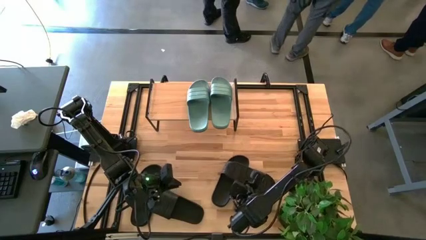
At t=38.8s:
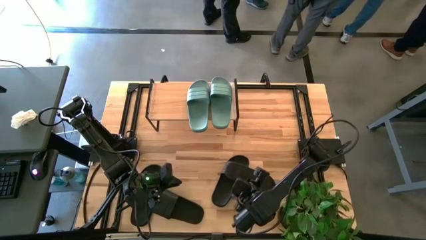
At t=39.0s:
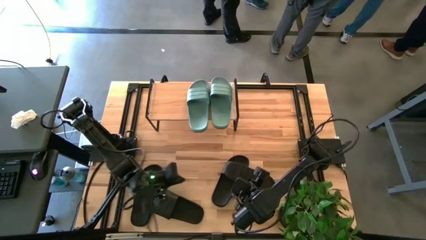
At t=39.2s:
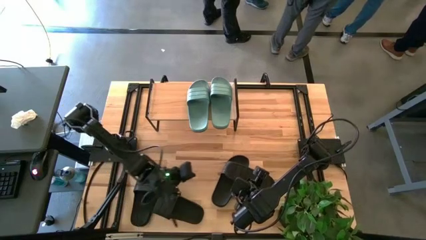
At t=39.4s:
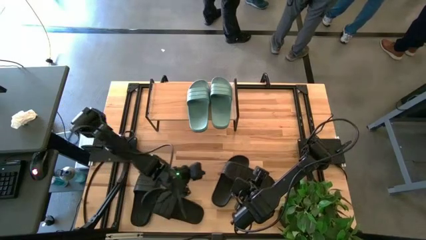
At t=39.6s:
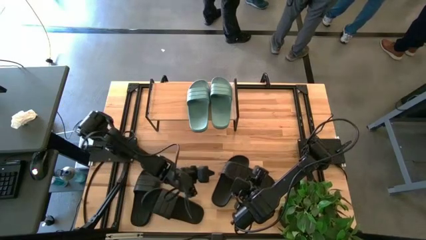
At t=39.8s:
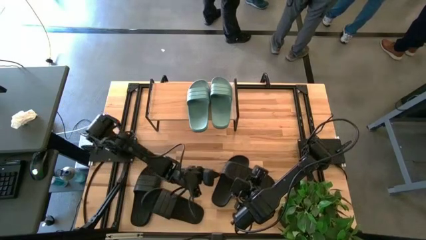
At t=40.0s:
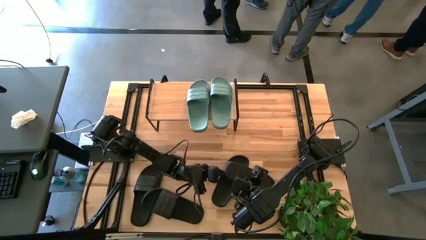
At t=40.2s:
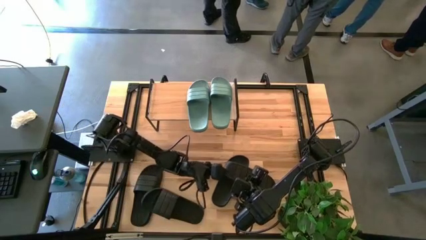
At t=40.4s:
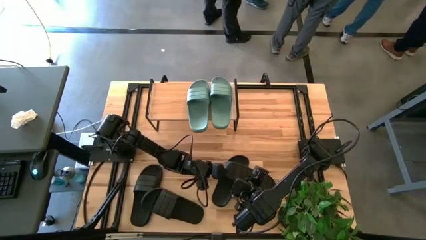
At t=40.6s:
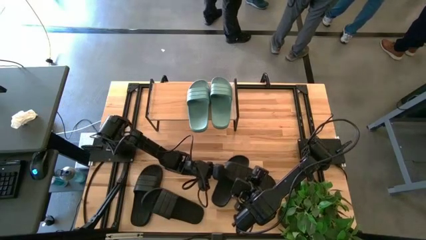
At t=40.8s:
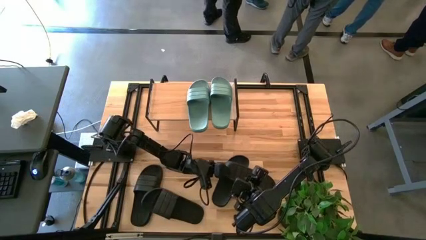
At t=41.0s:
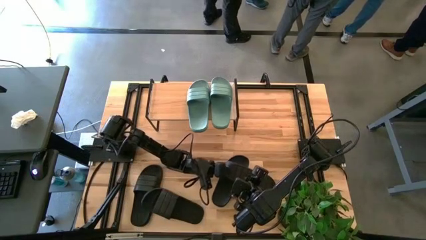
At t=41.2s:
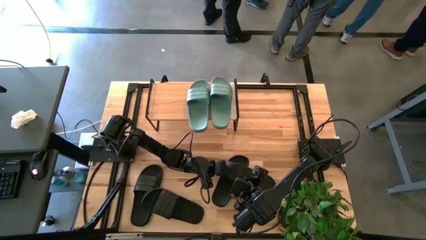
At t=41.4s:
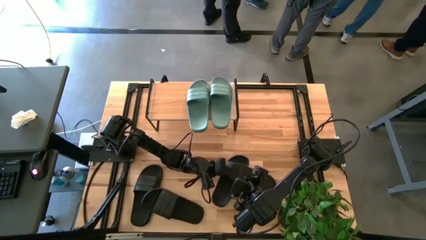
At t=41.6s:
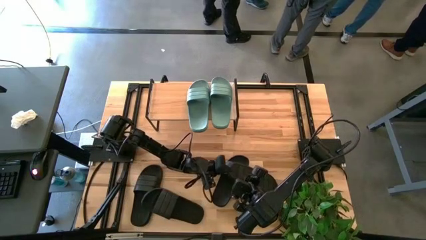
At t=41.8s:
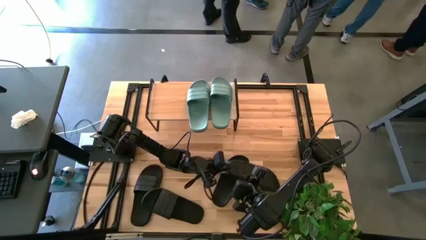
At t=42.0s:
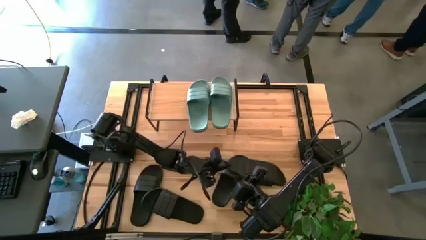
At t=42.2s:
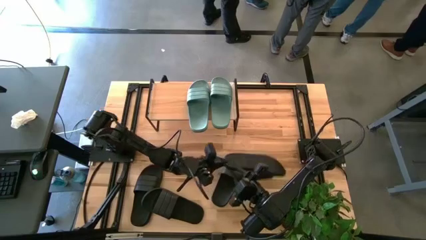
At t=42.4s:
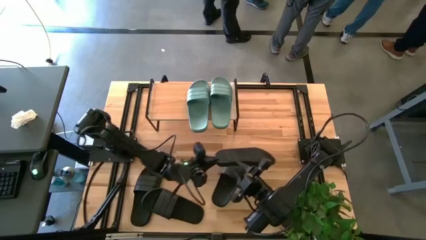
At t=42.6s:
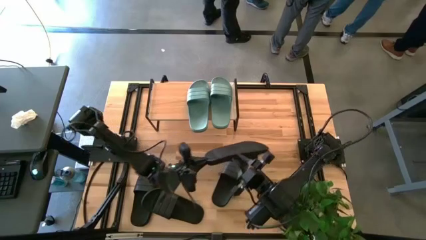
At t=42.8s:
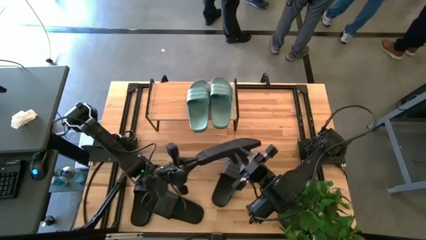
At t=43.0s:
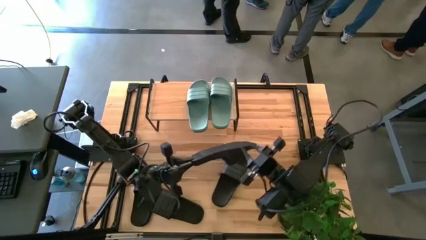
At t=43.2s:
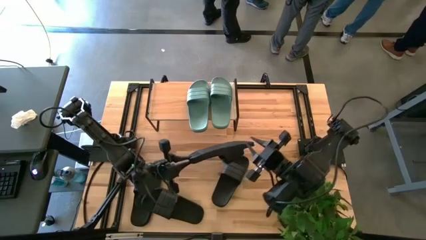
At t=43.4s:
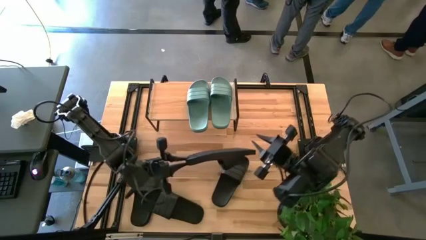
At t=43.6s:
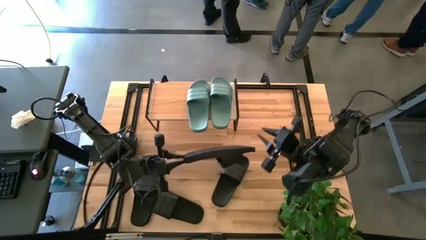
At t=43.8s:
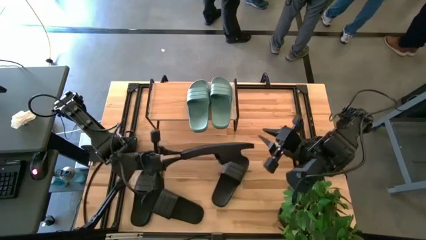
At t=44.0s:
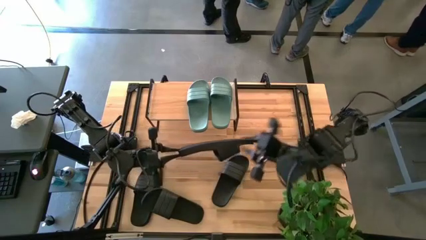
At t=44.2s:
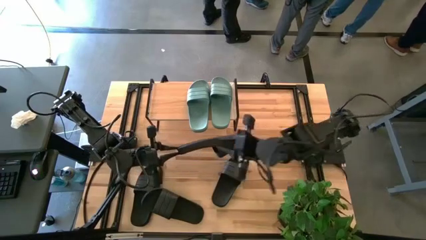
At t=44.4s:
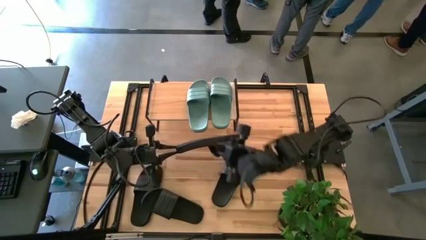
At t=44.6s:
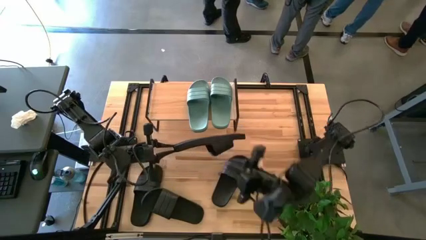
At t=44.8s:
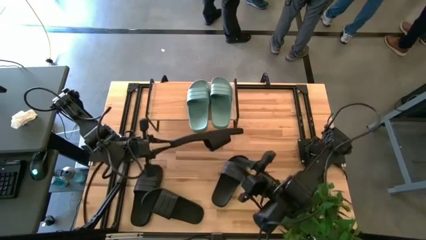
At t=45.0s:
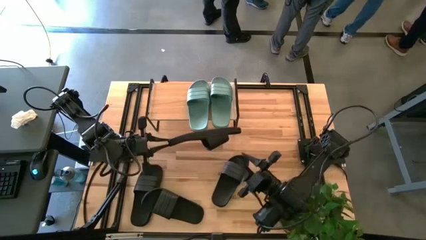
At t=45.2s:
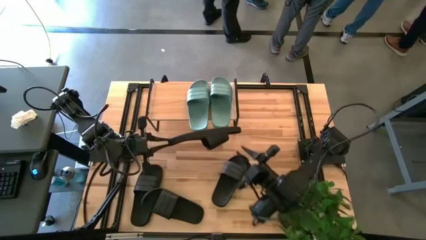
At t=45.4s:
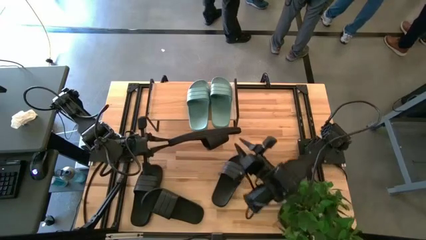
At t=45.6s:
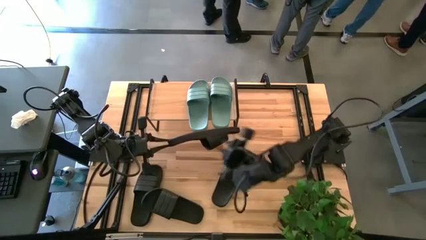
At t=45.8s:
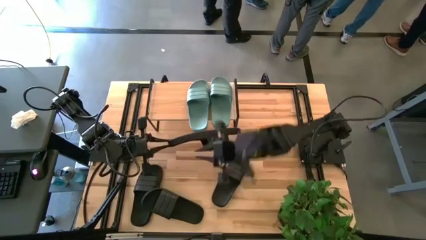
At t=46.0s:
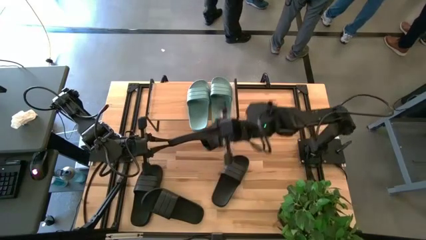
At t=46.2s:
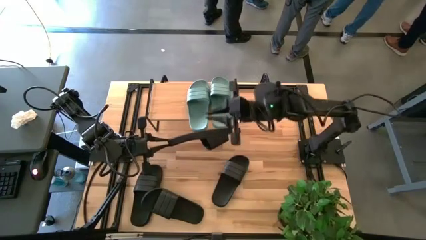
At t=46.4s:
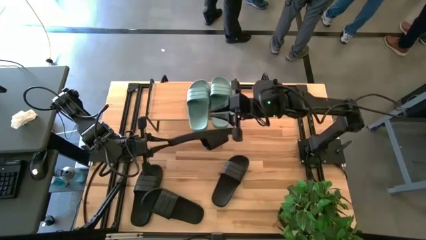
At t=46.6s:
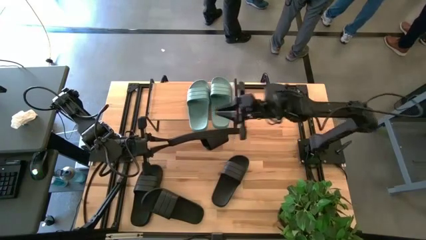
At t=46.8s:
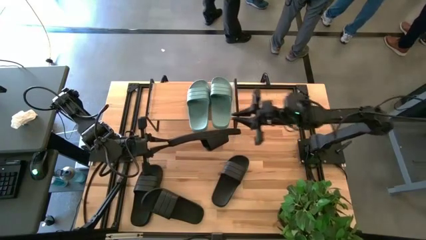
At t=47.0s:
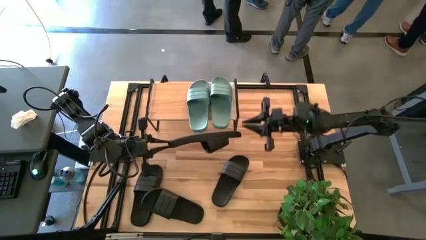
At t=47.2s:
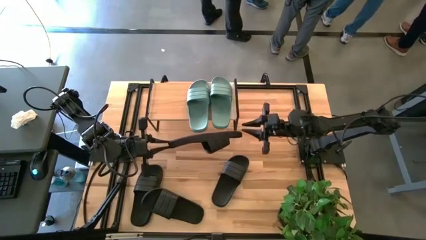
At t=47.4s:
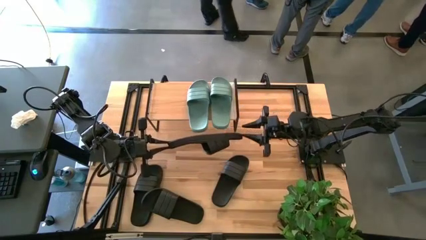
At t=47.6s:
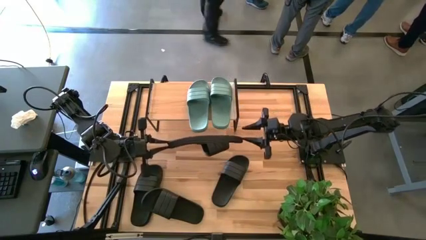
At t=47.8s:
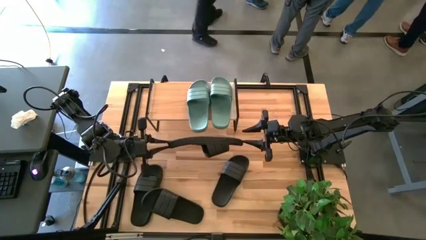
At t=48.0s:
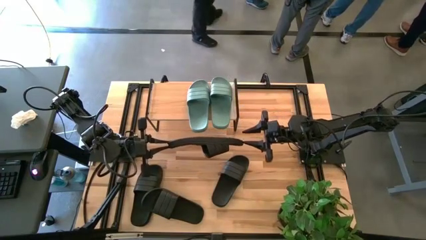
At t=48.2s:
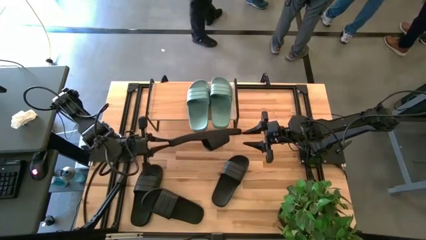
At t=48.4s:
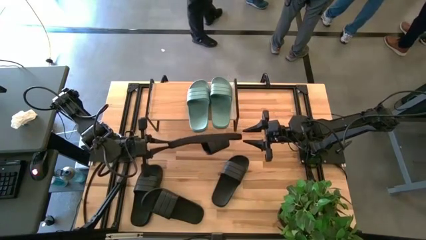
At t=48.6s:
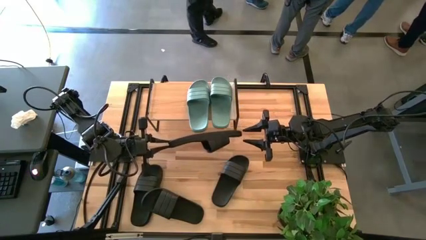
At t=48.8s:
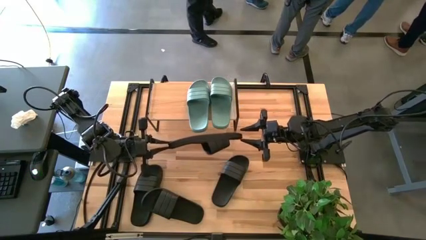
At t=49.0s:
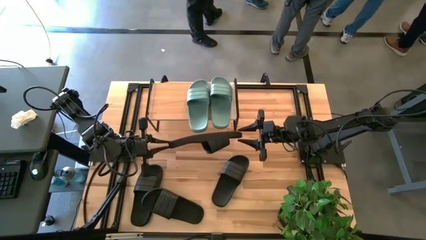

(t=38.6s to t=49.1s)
Task: Pick and place slides into the shelf
Put the black slide under the shelf
